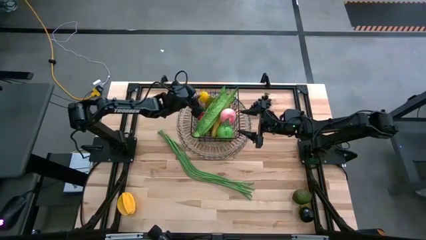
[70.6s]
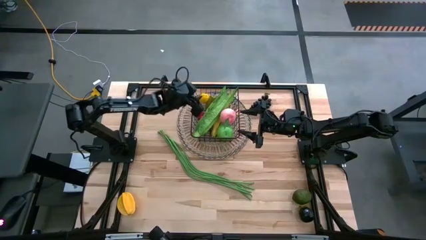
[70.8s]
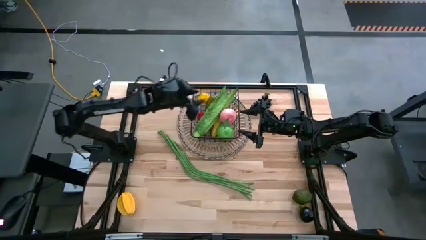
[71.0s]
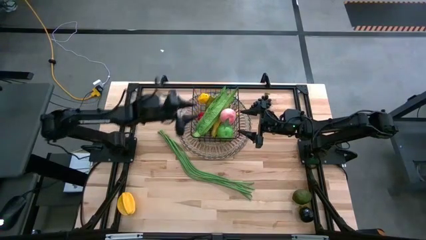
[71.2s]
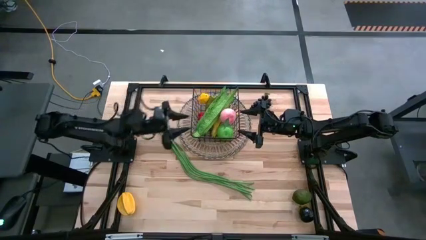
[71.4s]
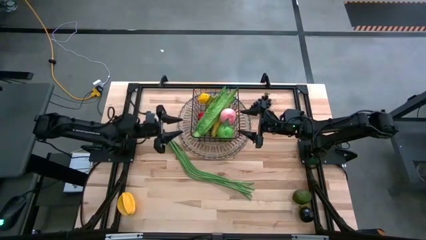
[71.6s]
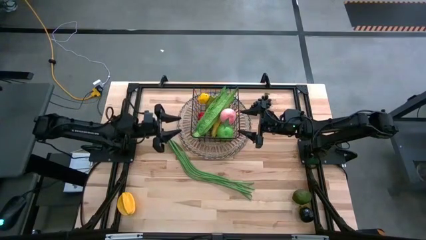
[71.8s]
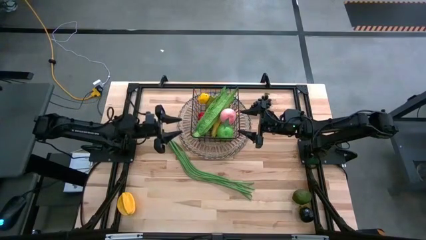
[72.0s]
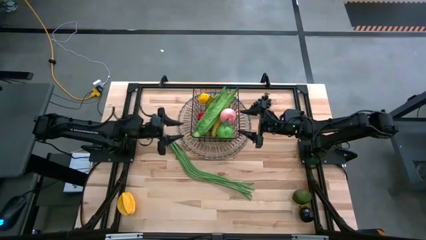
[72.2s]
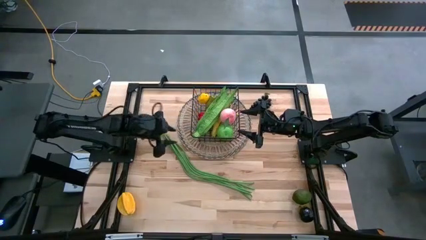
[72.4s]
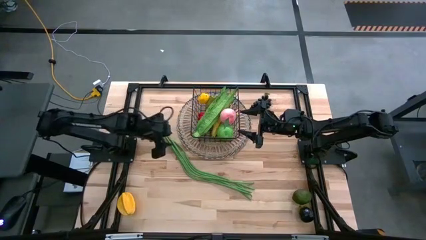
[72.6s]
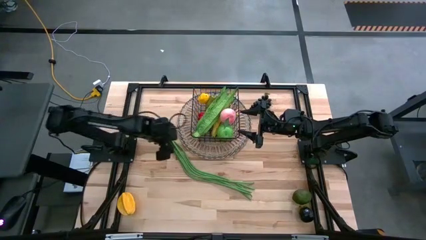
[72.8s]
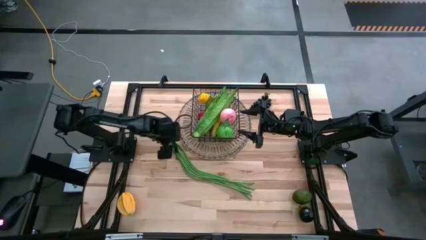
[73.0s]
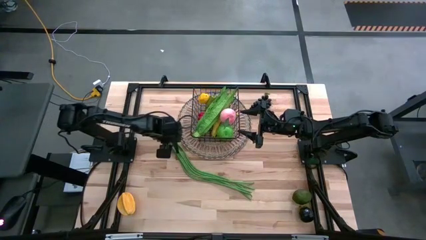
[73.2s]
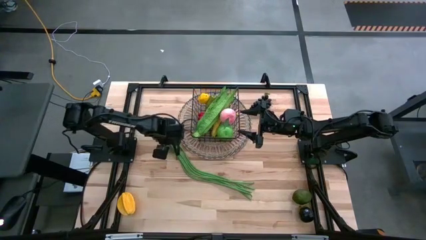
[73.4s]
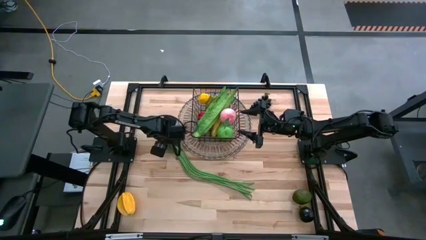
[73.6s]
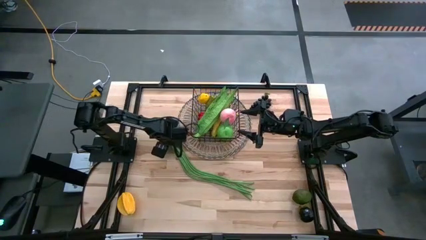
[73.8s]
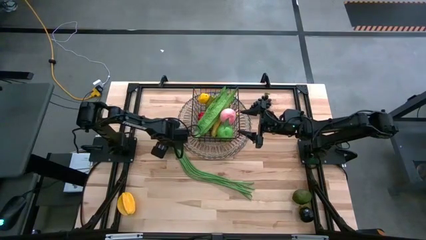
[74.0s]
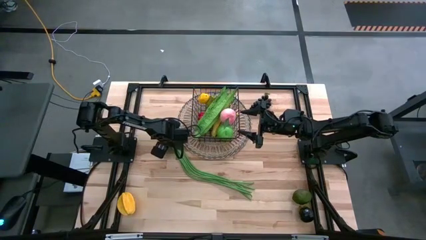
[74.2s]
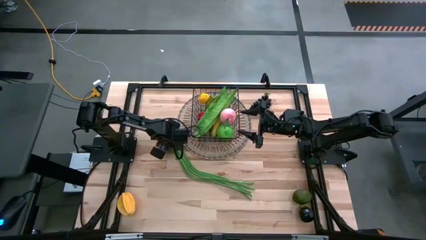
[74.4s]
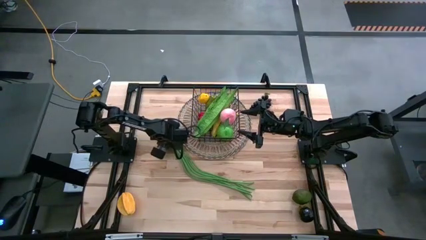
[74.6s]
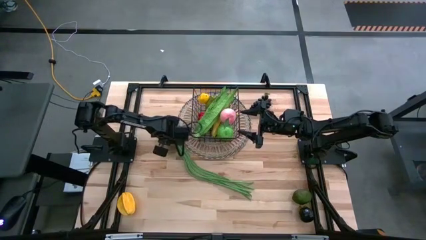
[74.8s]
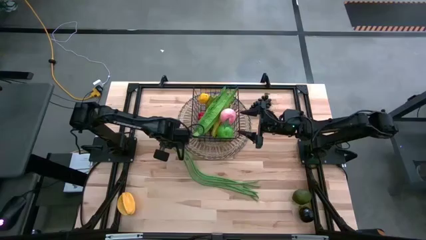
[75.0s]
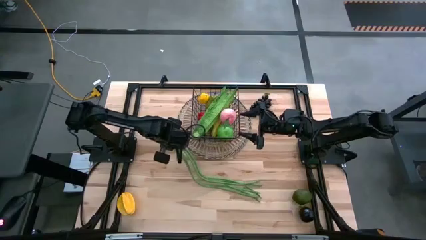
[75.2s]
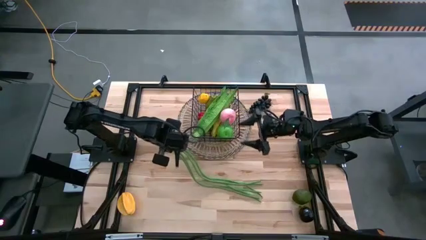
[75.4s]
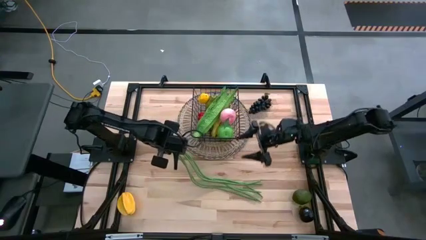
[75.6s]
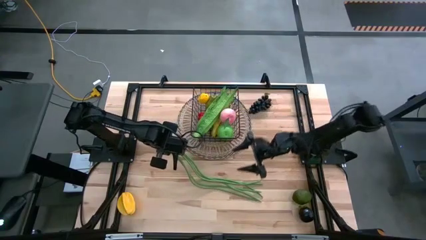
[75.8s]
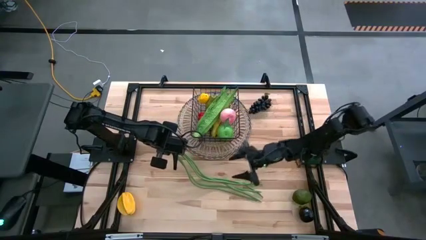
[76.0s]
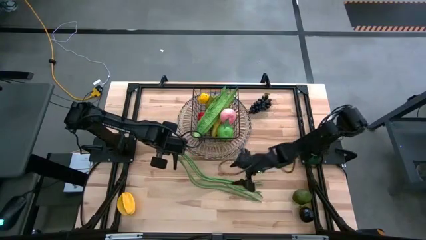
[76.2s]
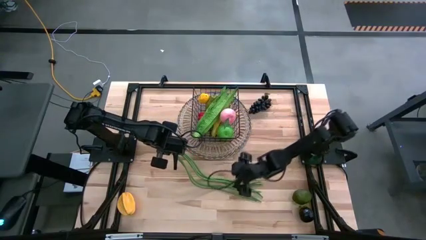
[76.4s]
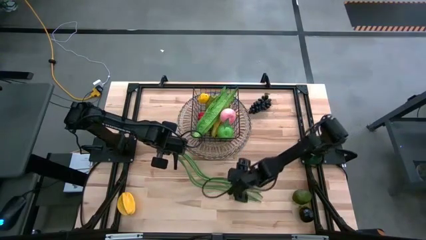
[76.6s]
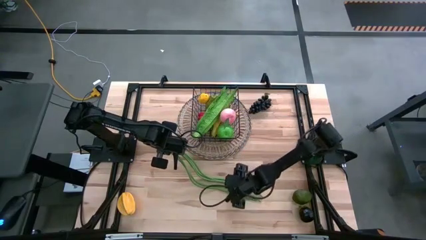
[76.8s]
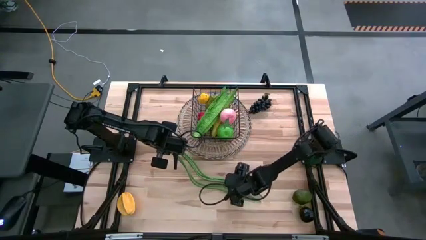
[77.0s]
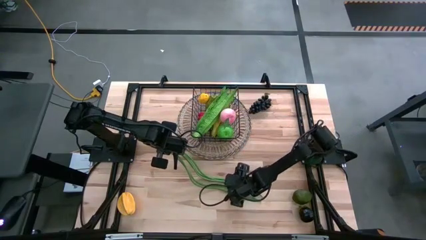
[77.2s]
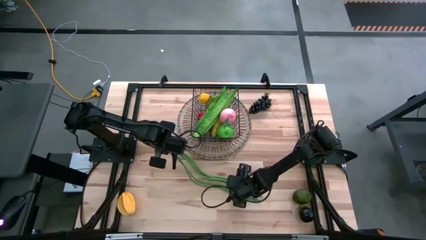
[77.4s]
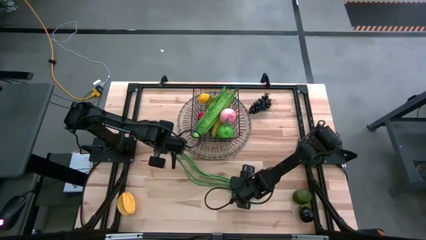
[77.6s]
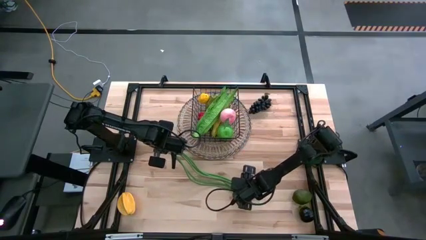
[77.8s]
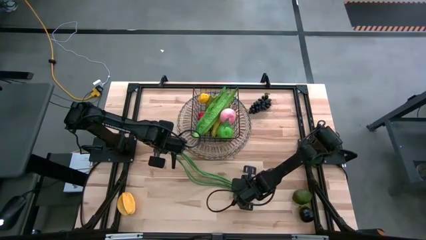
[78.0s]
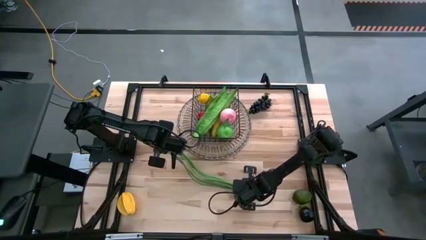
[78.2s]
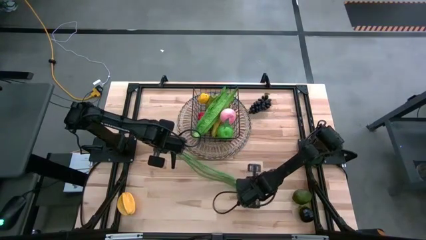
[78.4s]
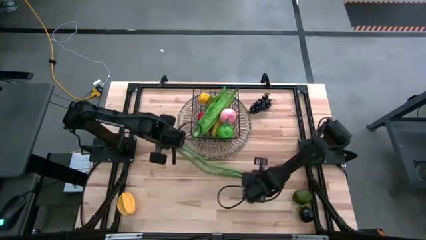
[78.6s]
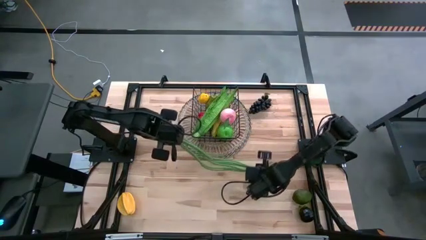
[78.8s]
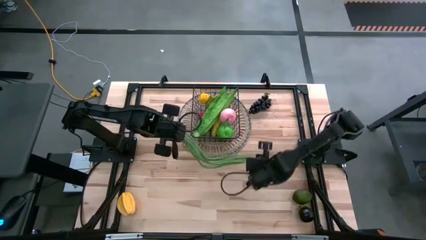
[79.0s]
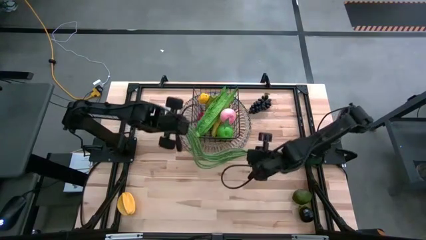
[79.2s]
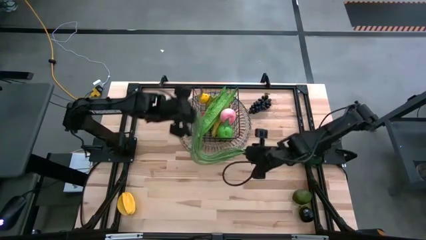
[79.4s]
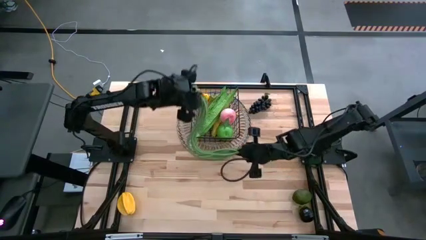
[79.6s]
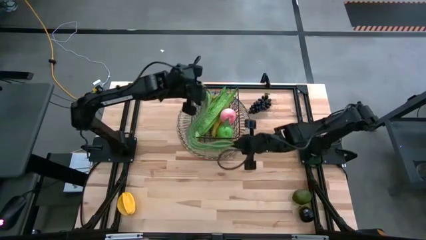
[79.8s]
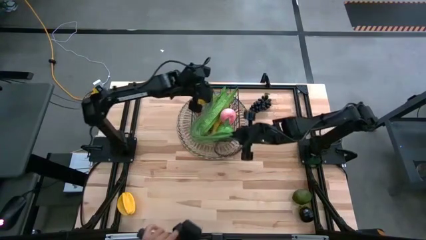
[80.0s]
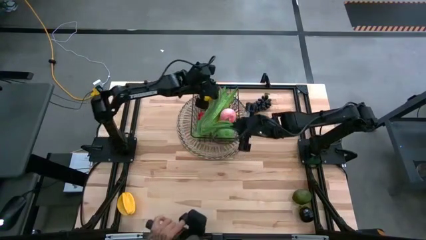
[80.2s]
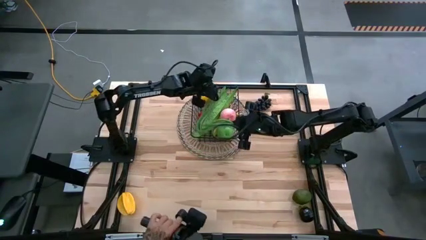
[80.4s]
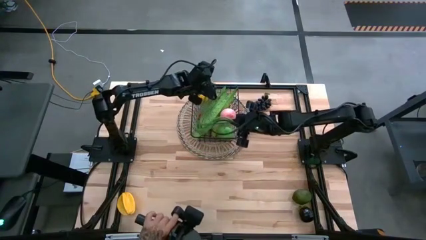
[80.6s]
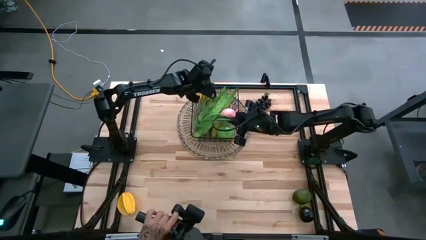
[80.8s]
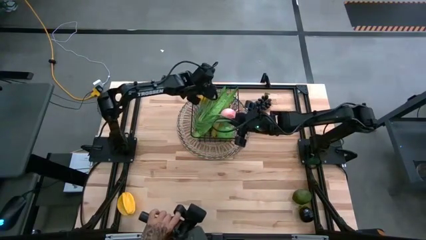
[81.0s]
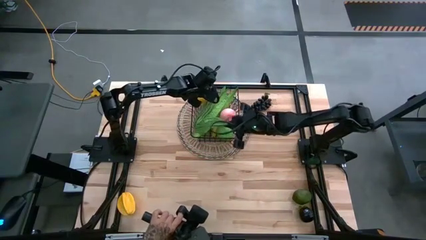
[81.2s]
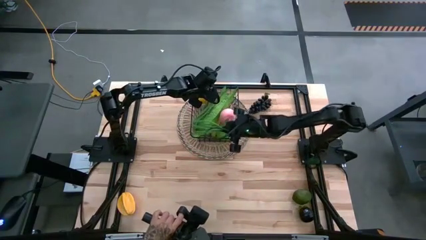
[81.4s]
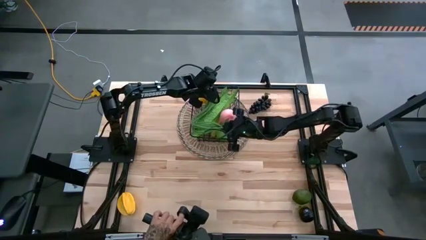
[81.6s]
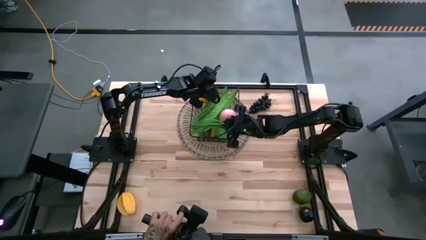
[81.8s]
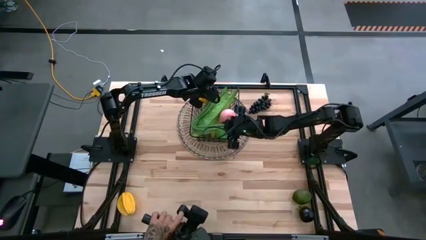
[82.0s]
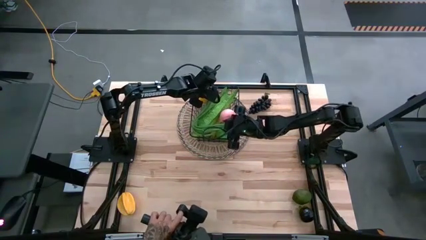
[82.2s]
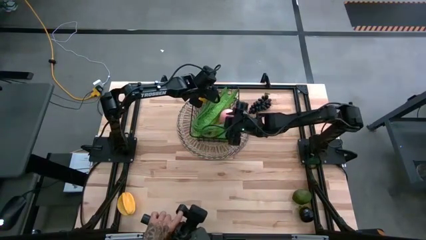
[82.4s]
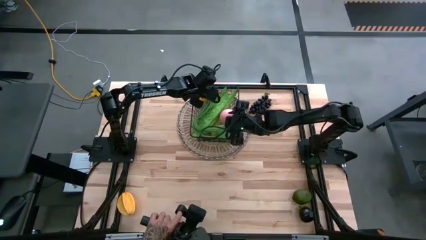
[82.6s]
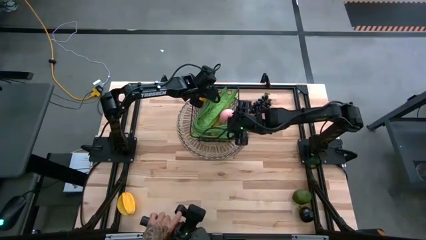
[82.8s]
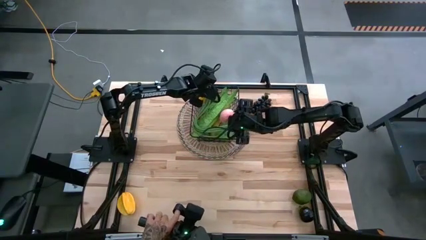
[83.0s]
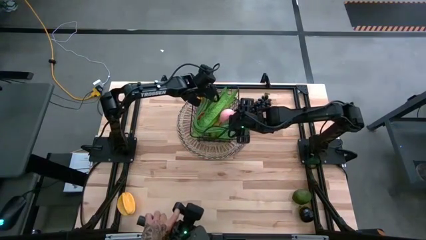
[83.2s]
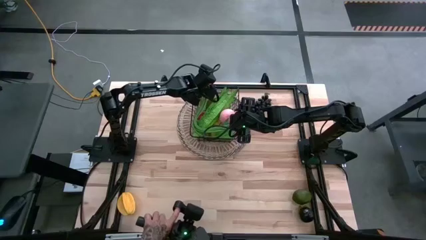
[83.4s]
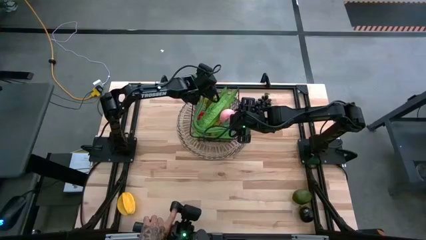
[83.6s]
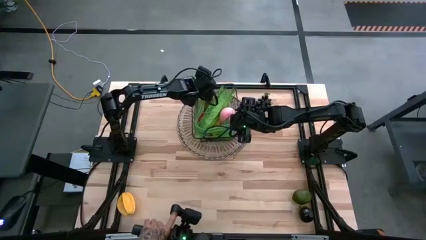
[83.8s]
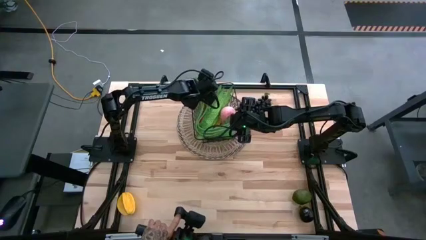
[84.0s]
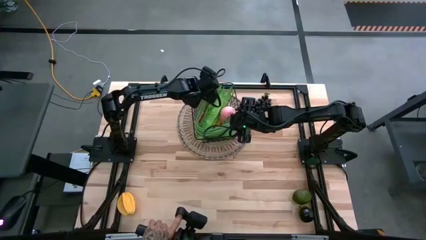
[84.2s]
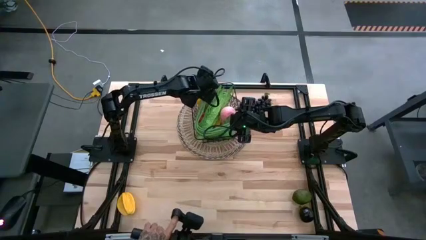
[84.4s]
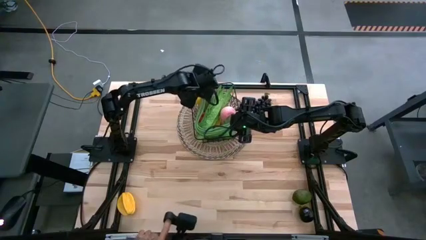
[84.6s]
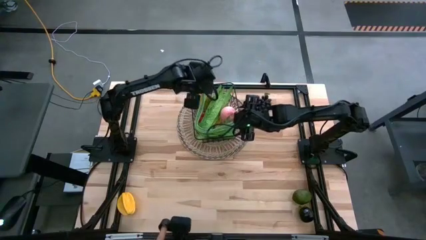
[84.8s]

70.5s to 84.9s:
Task: Build produce basket
Put the green beans into the black mesh basket

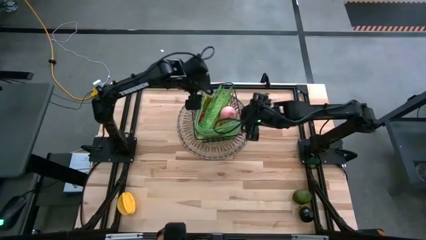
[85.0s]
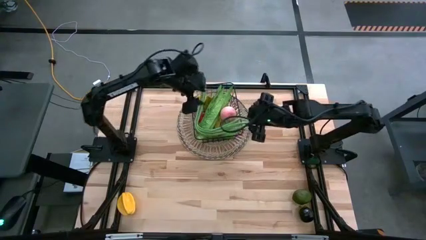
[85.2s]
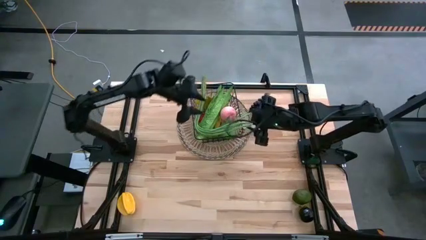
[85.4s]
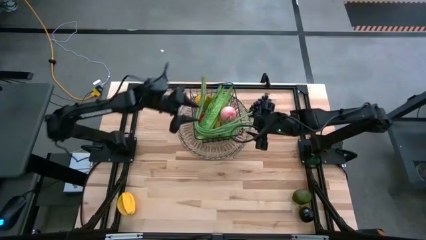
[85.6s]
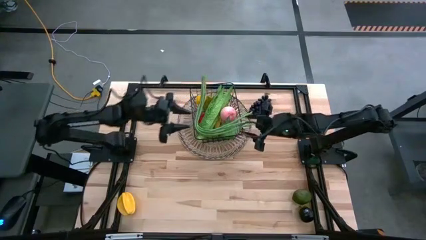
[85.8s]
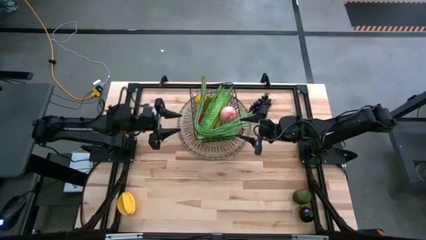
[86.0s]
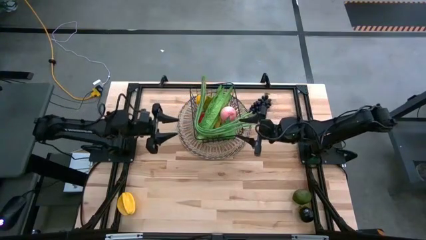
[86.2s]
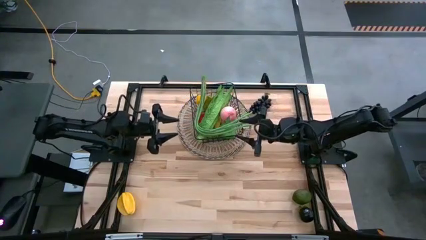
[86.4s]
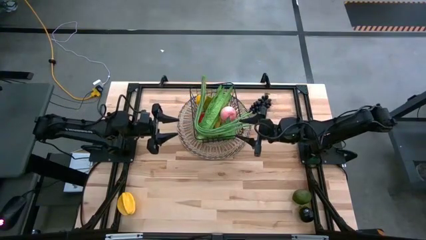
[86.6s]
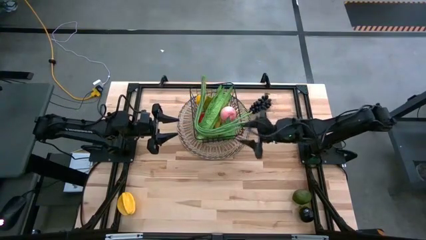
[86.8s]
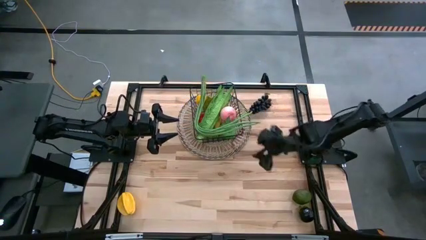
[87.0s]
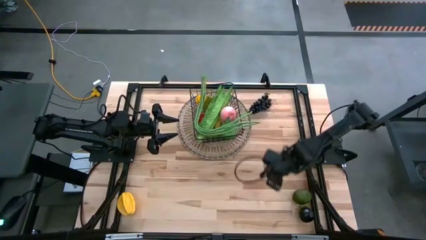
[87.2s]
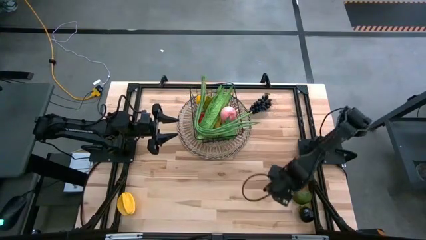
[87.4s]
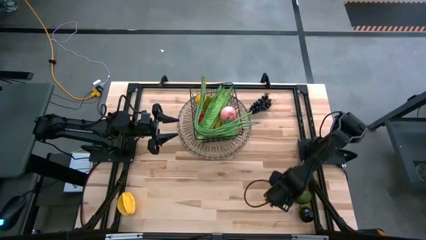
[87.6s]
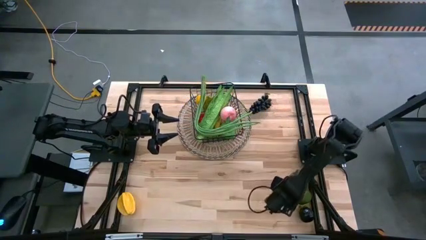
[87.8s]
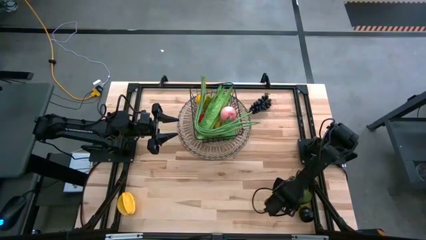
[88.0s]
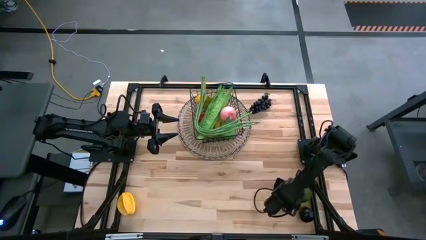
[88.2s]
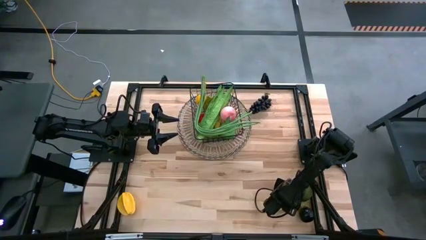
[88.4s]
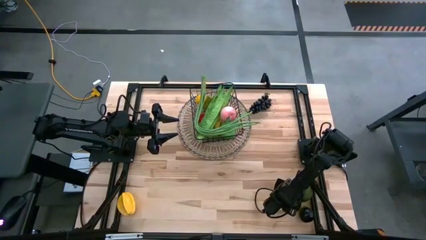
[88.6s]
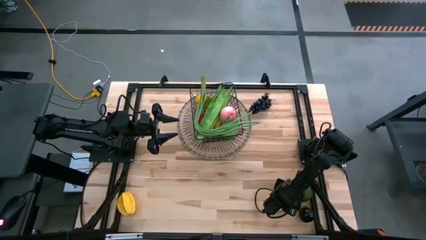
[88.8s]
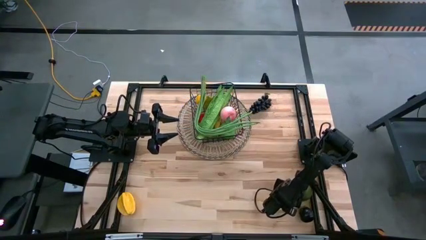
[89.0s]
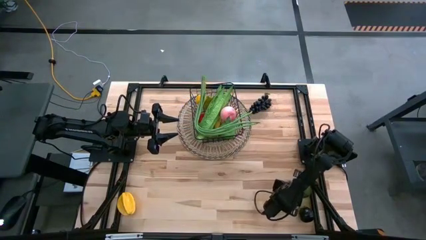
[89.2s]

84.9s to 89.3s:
Put the green lime into the black mesh basket
